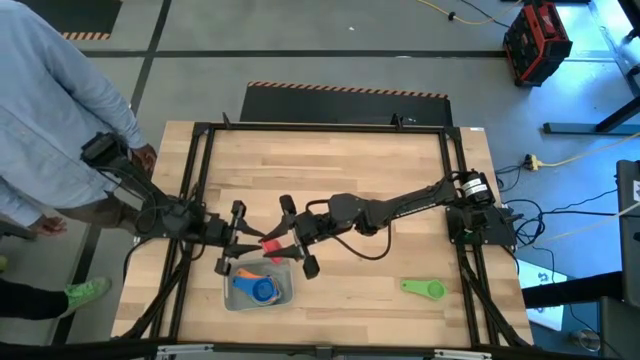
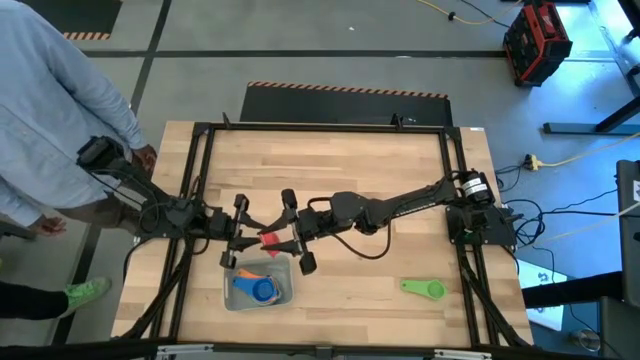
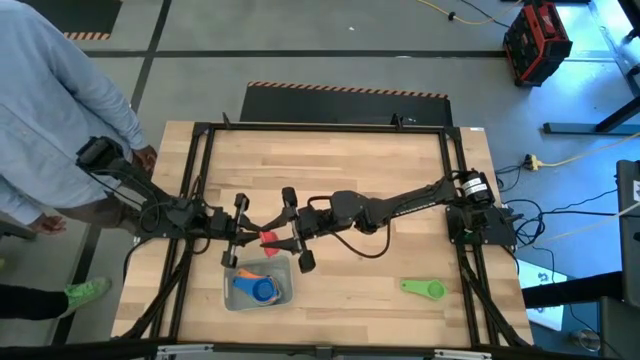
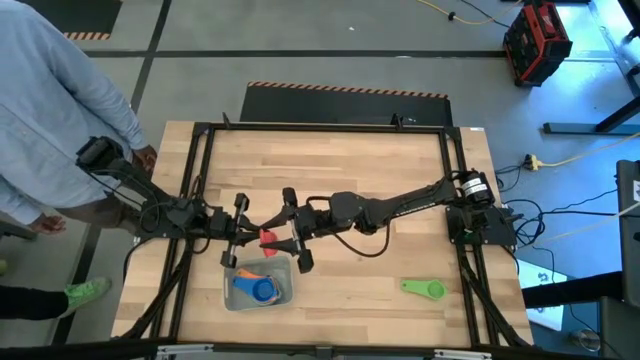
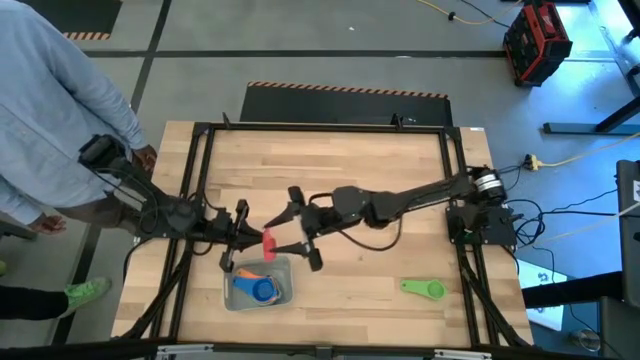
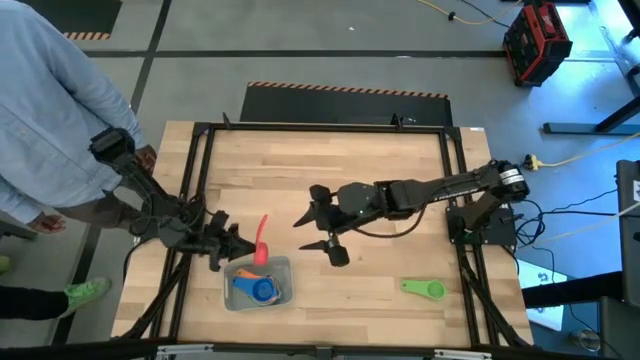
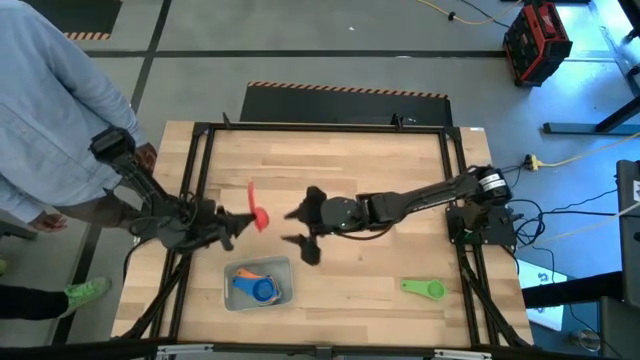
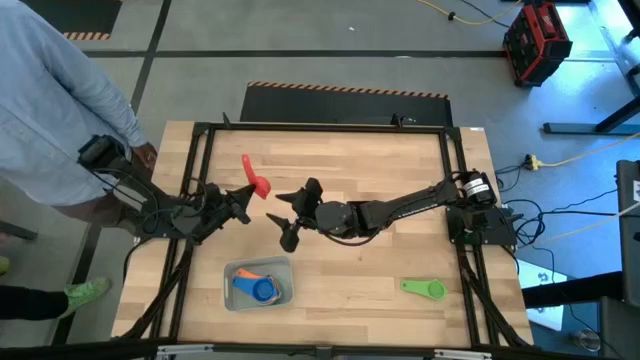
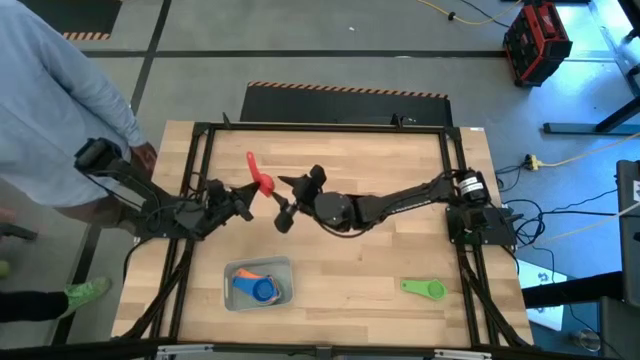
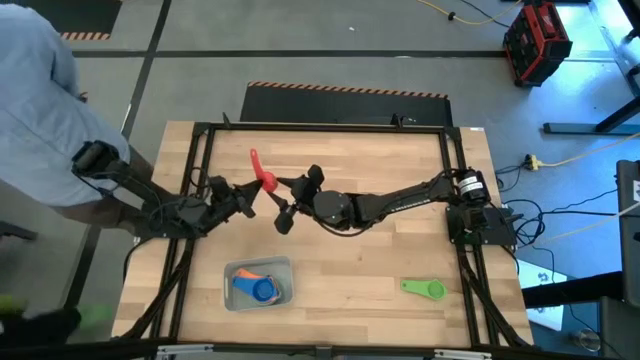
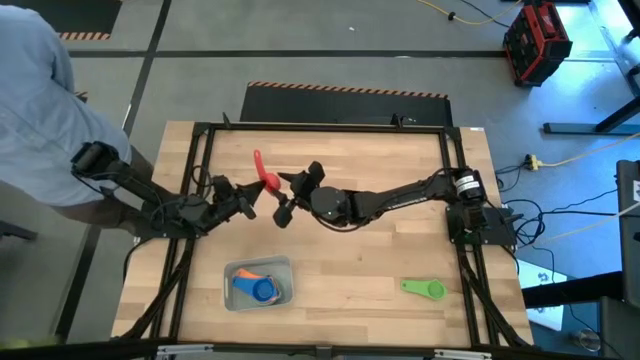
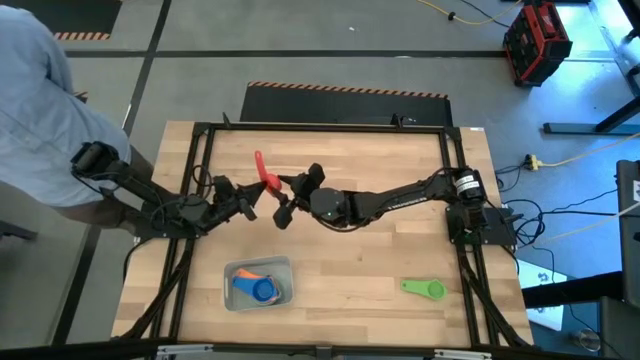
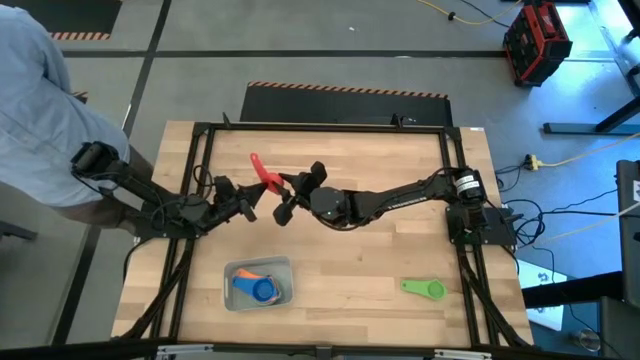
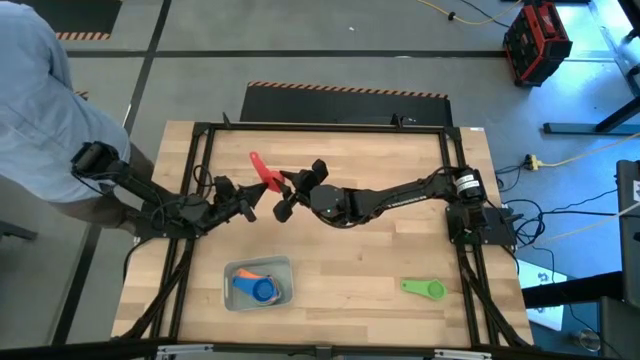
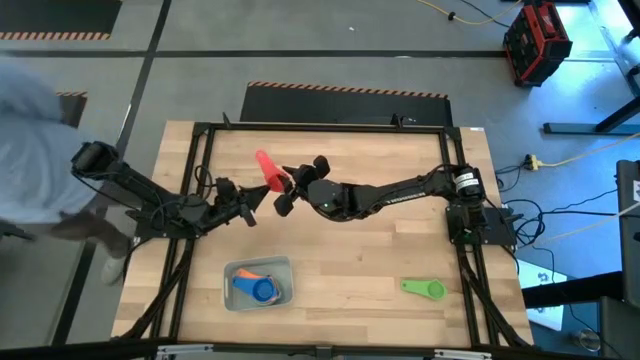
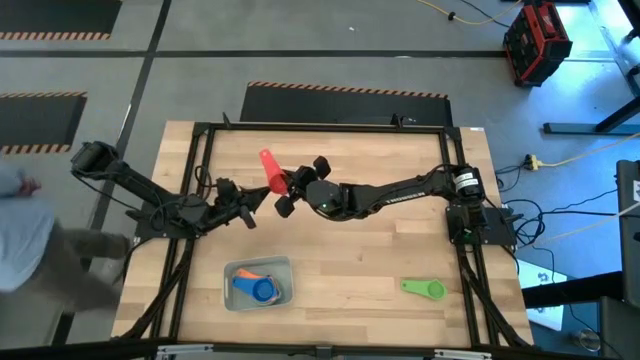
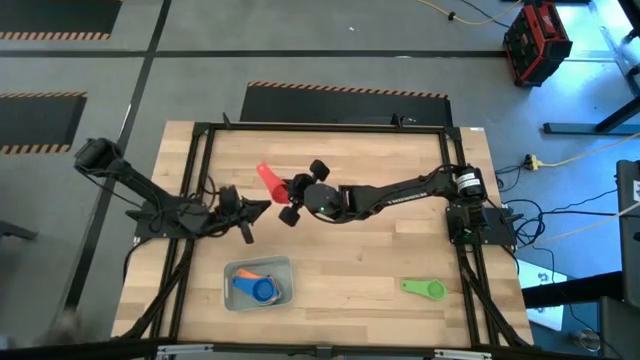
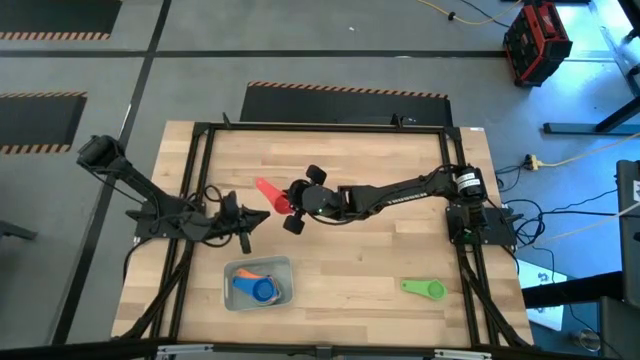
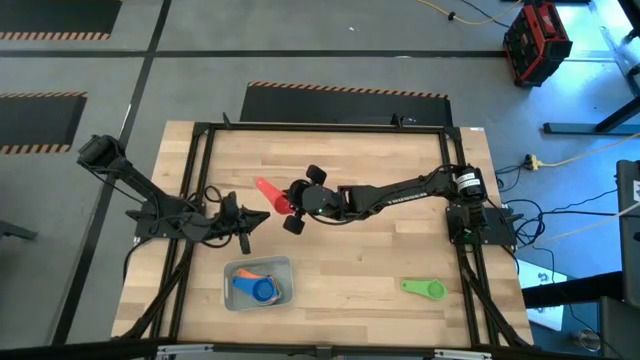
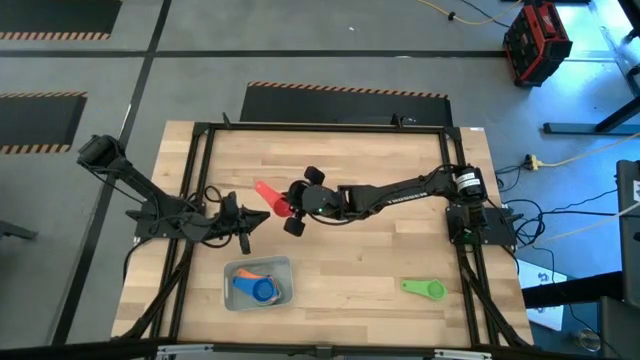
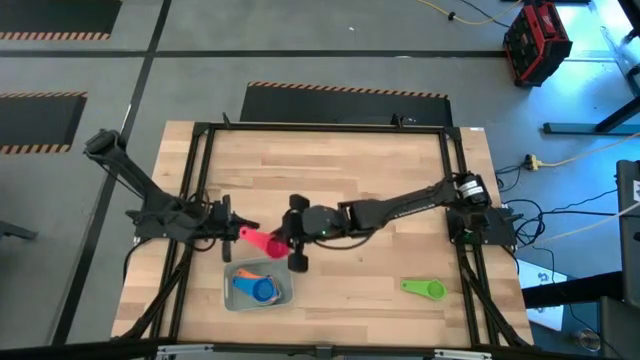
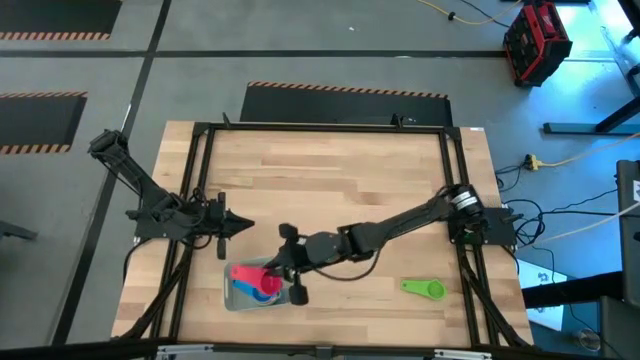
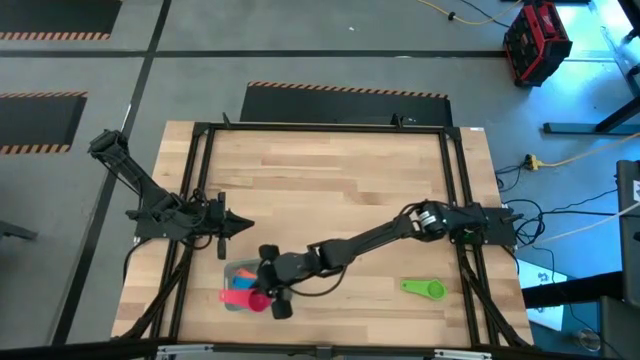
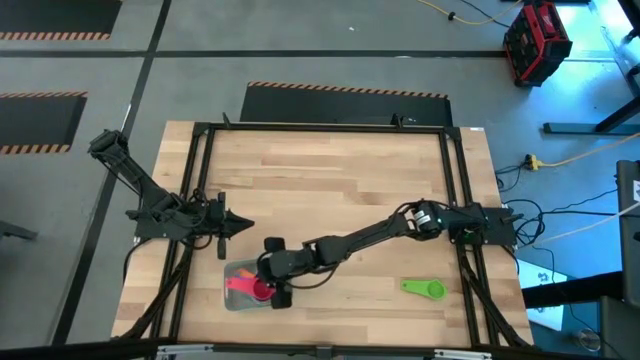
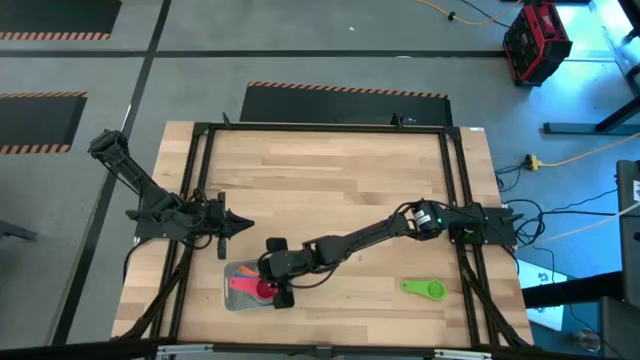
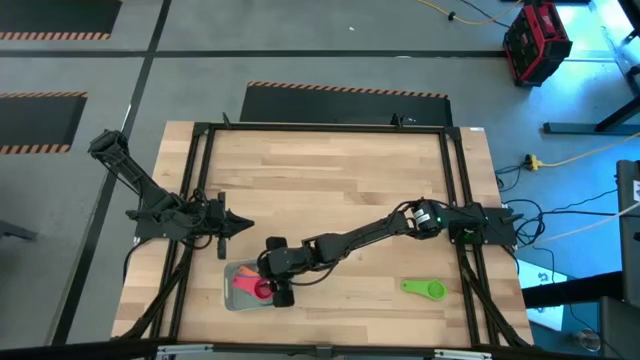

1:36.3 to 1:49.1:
Task: Nest measuring cups in basket
Stack the pink measuring cup on top of the blue measuring cup in the gray bin

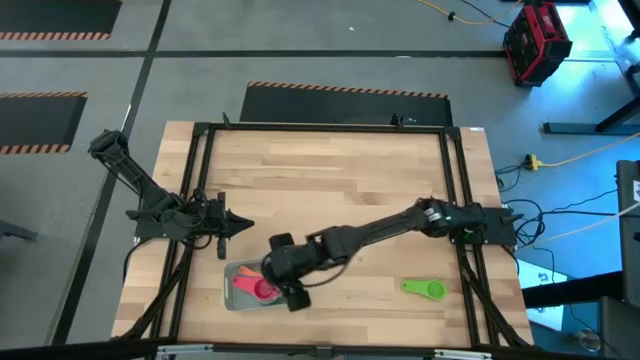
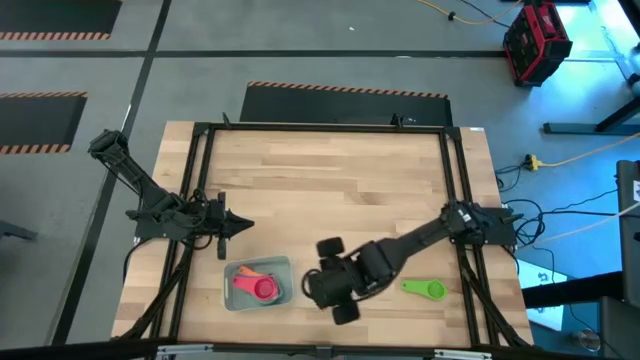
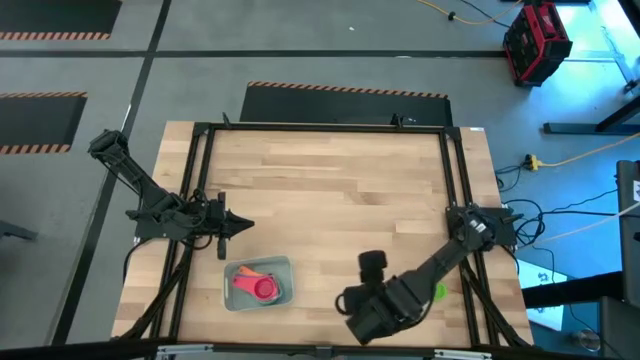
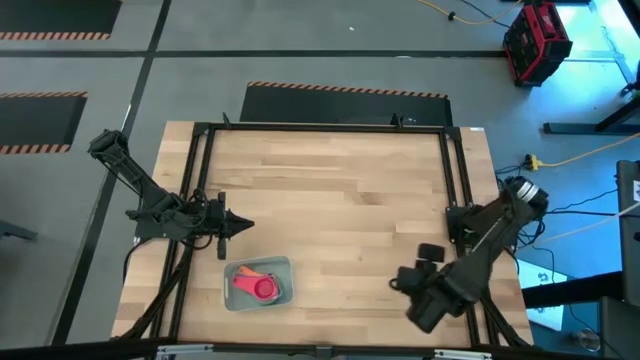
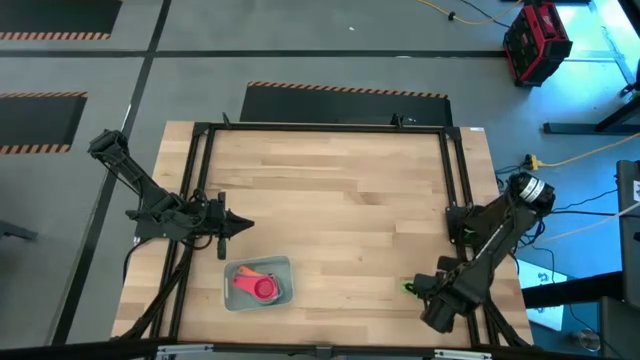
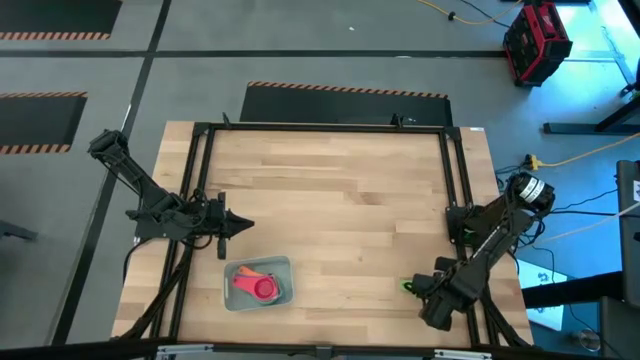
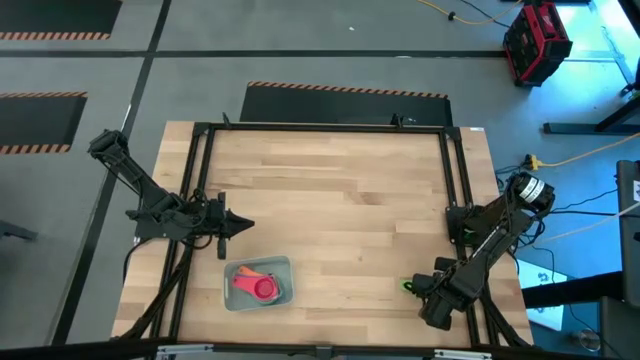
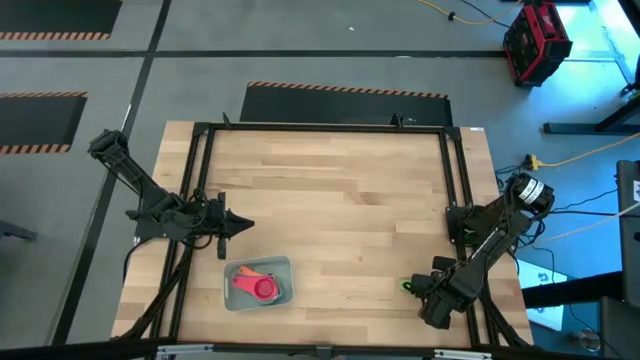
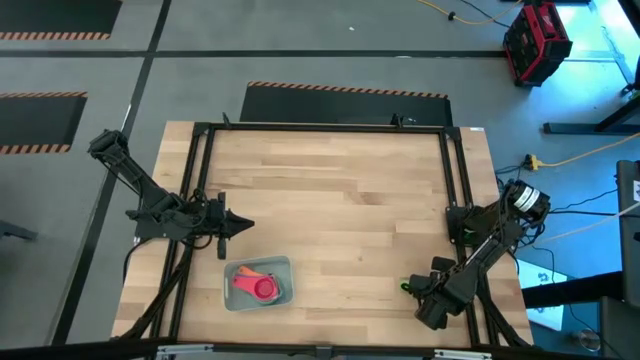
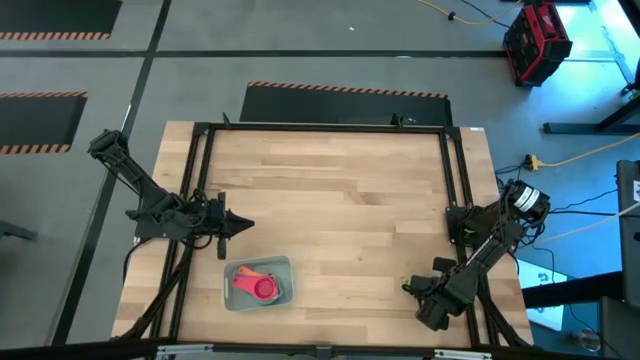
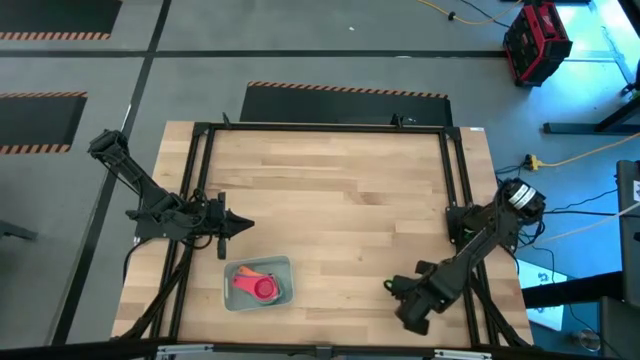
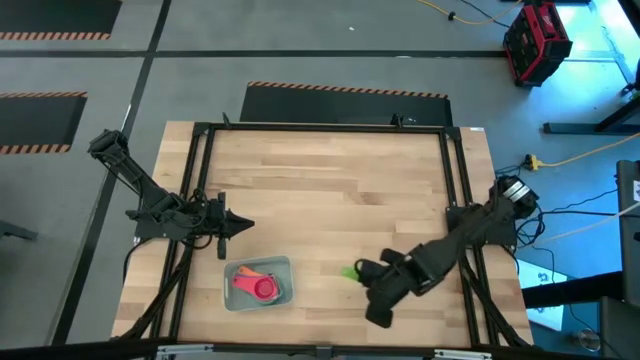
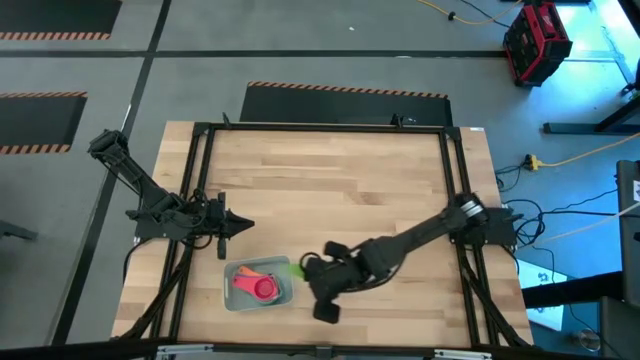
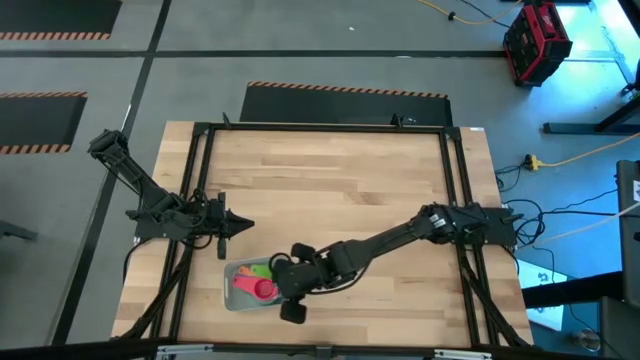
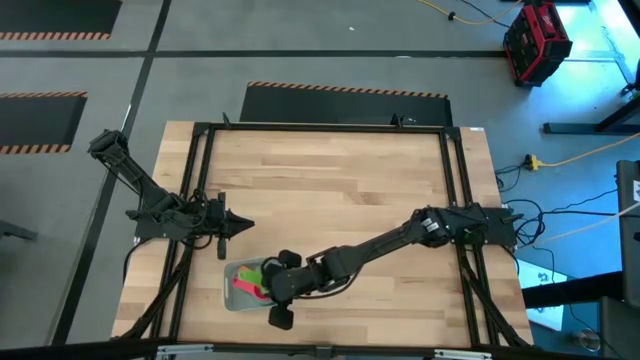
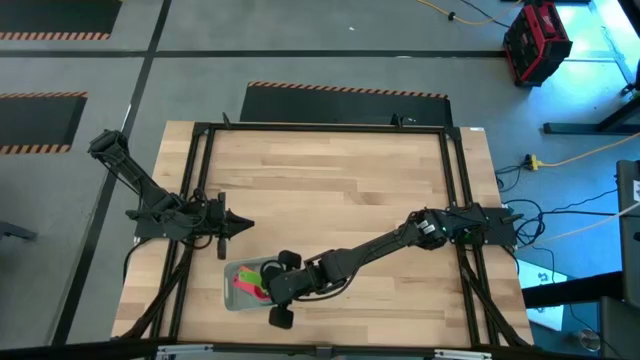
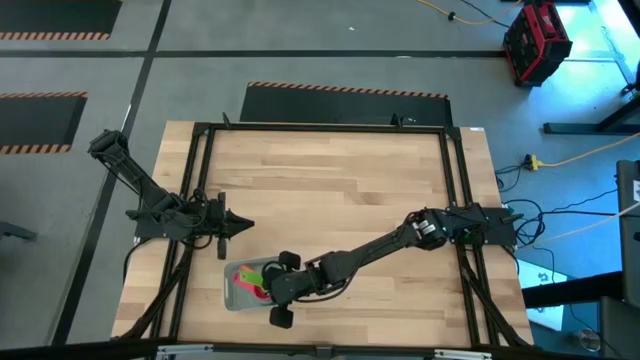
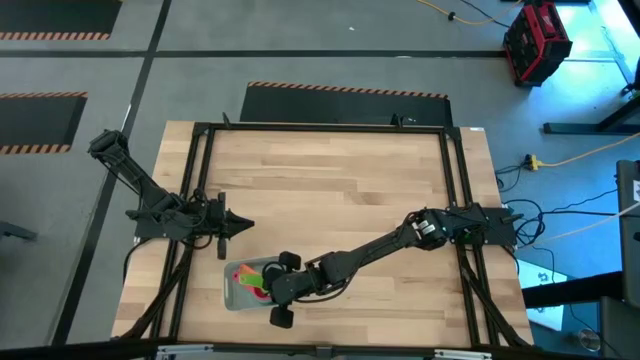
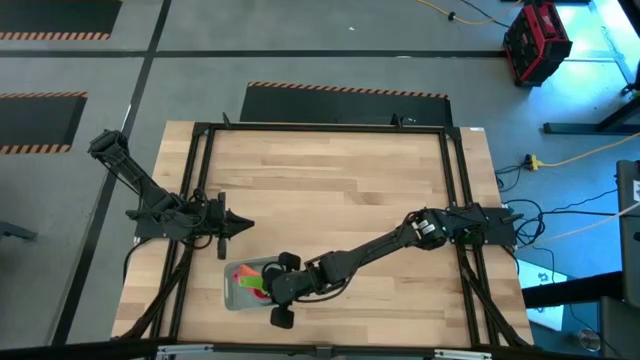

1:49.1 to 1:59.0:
Stack the green measuring cup on top of the pink measuring cup in the gray bin
